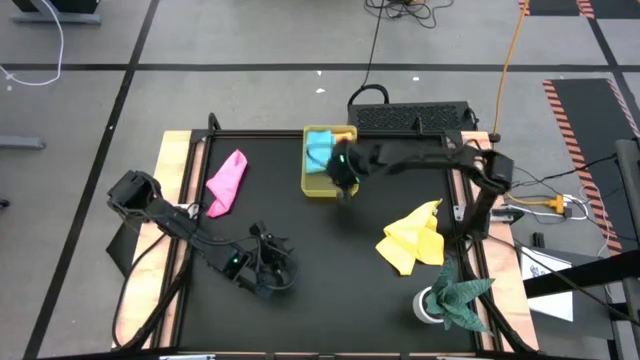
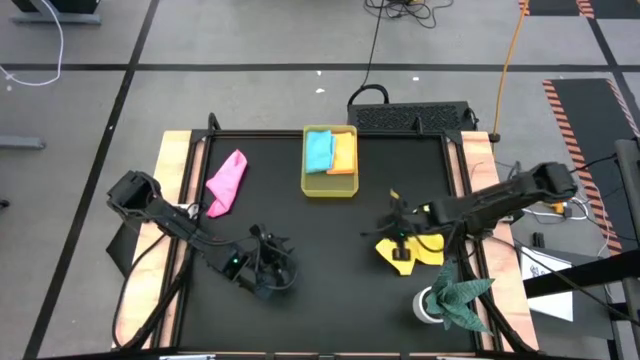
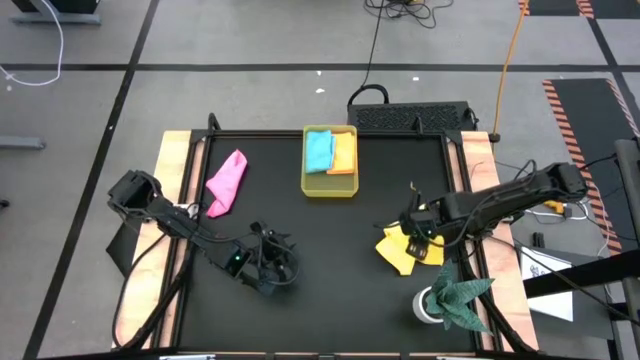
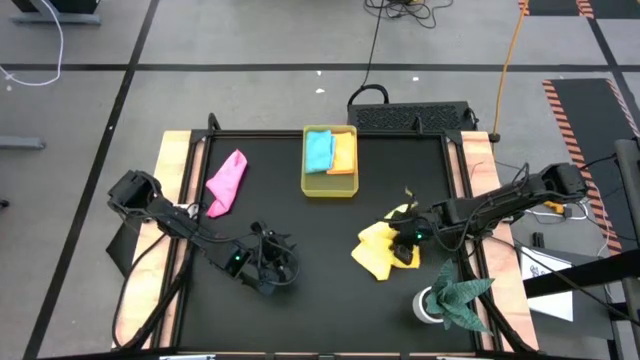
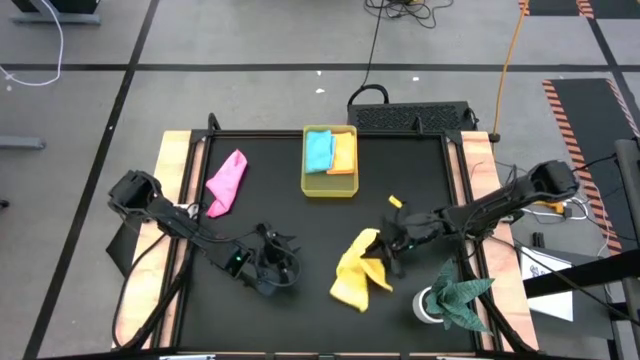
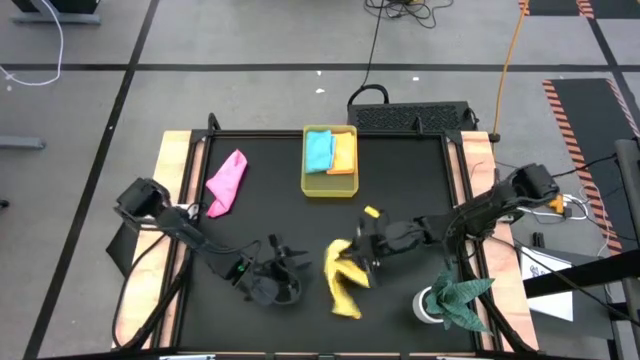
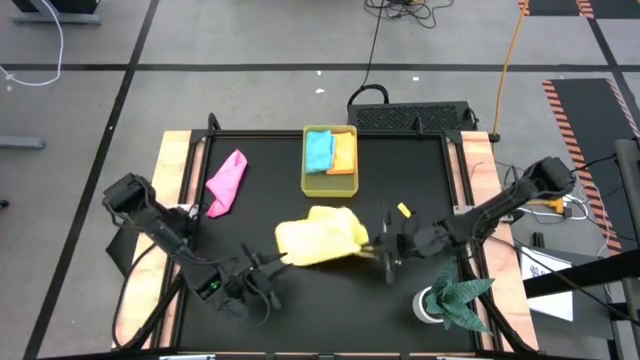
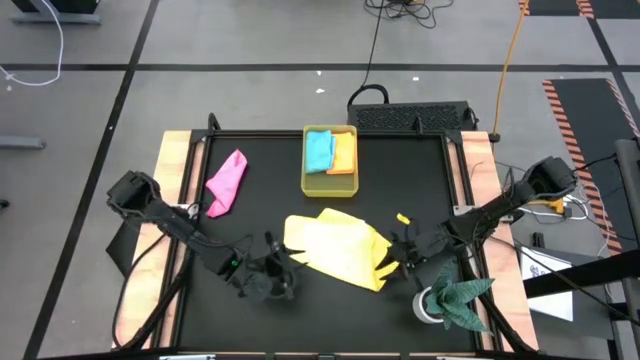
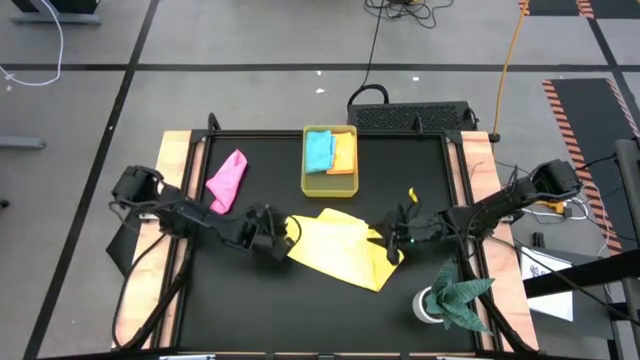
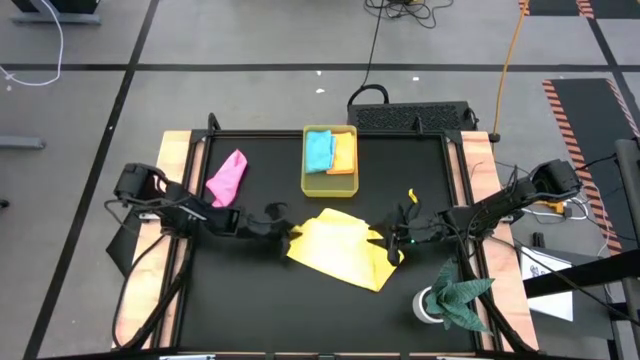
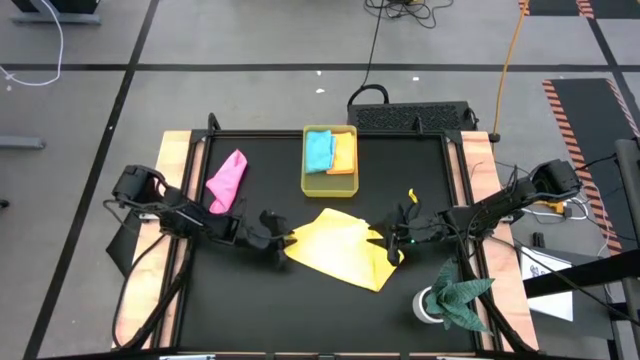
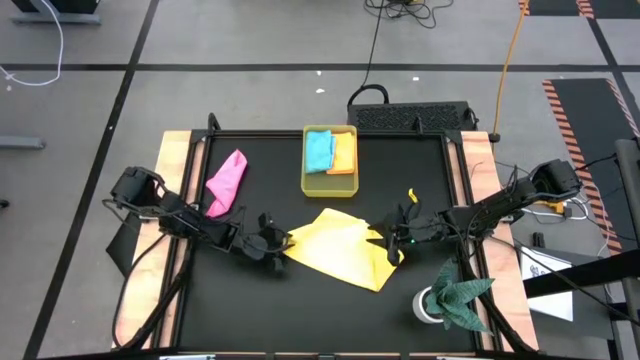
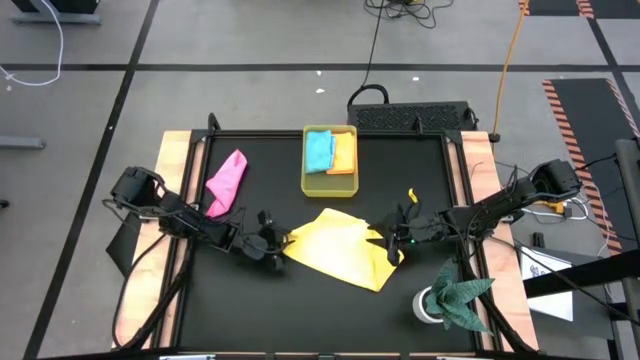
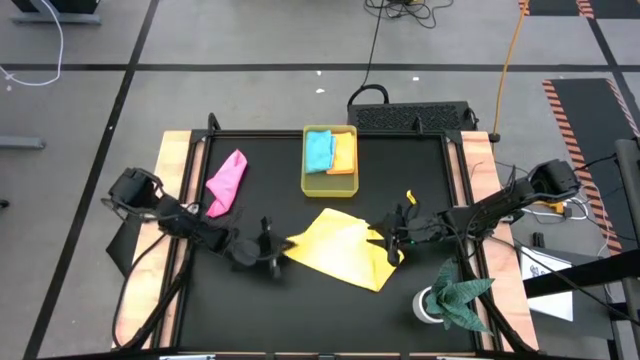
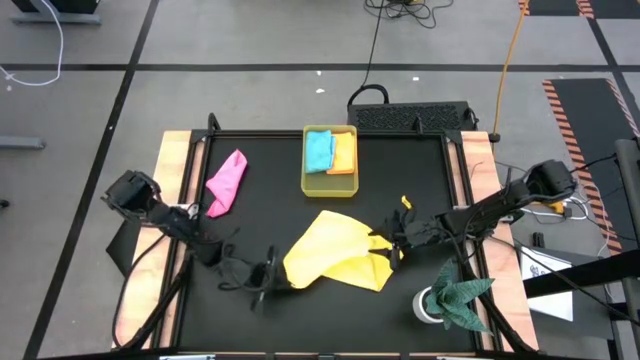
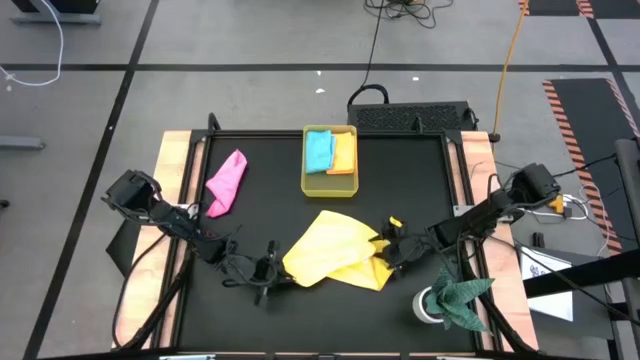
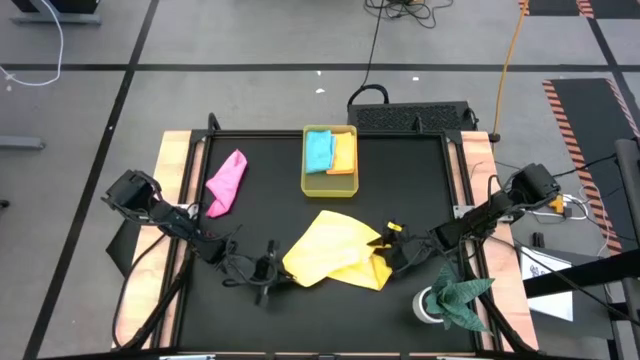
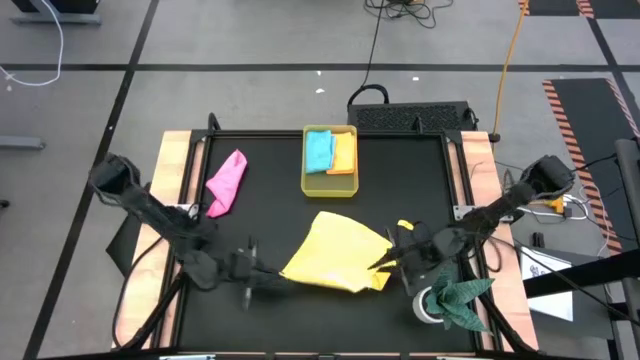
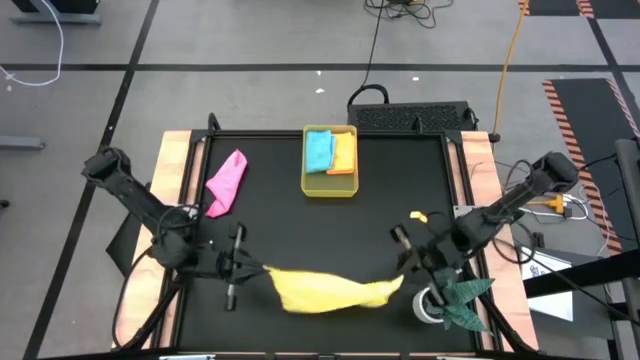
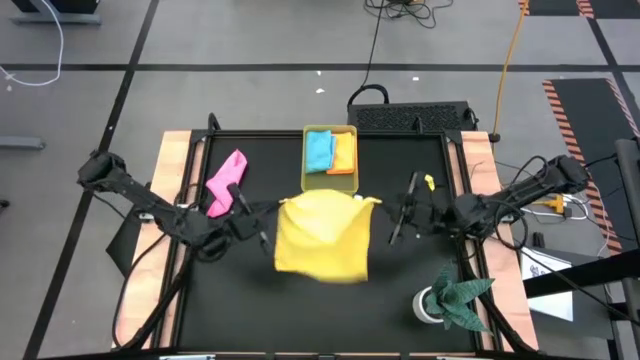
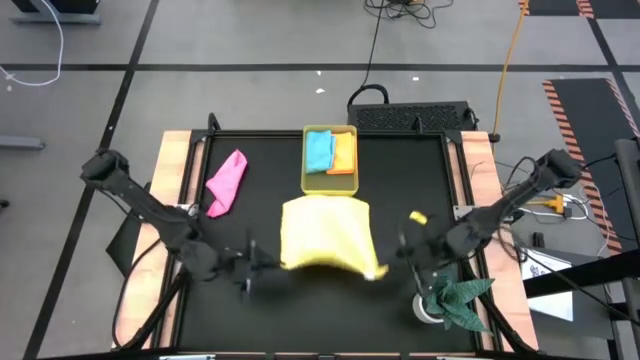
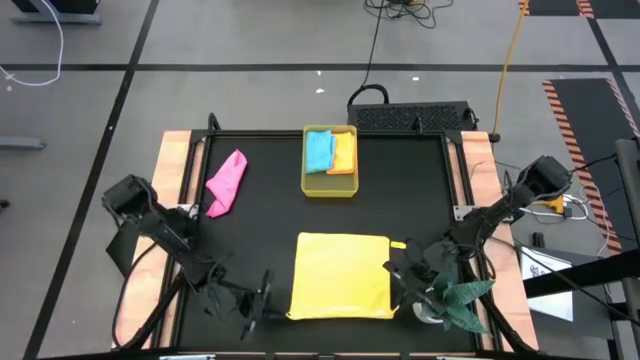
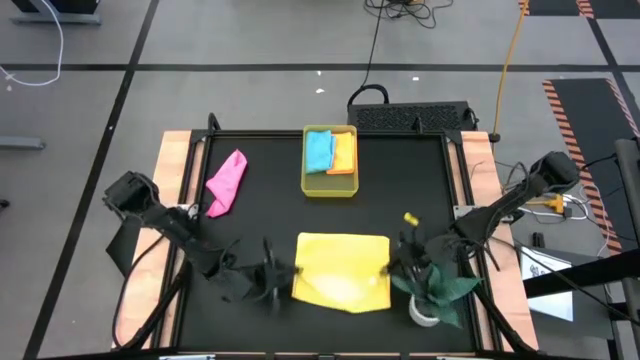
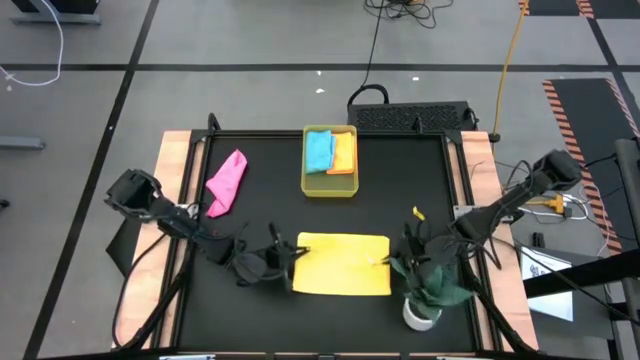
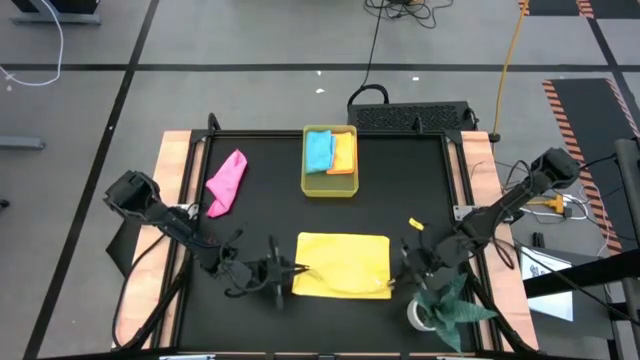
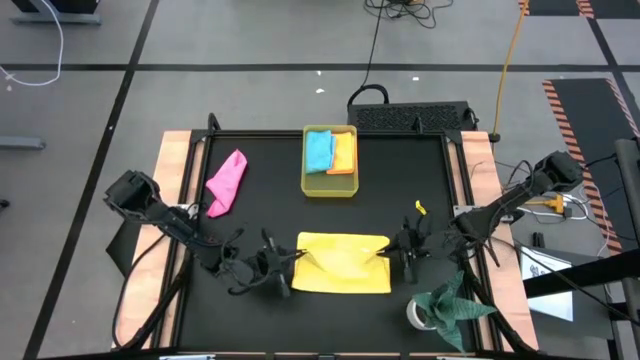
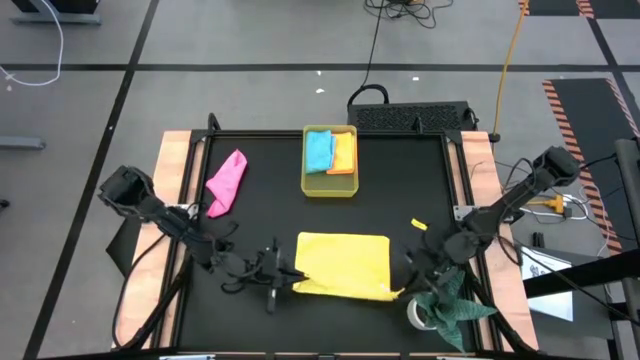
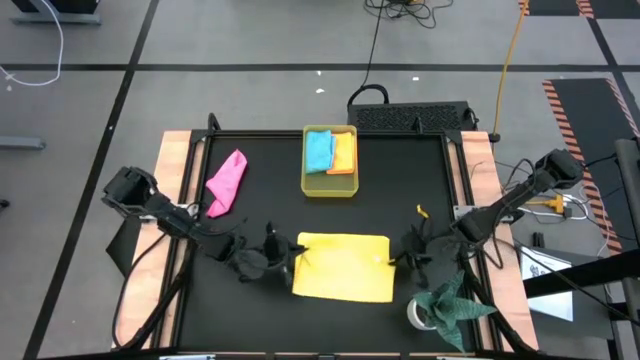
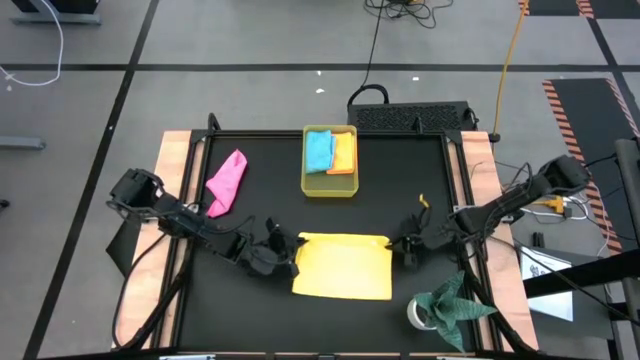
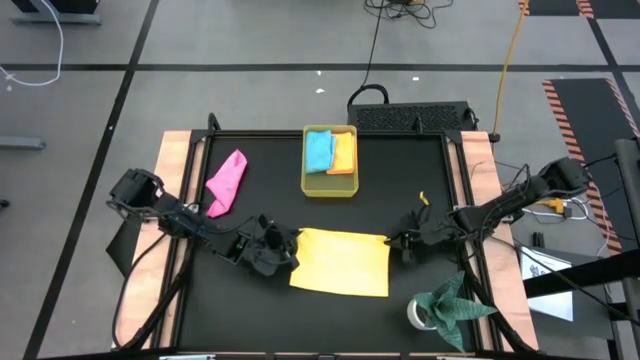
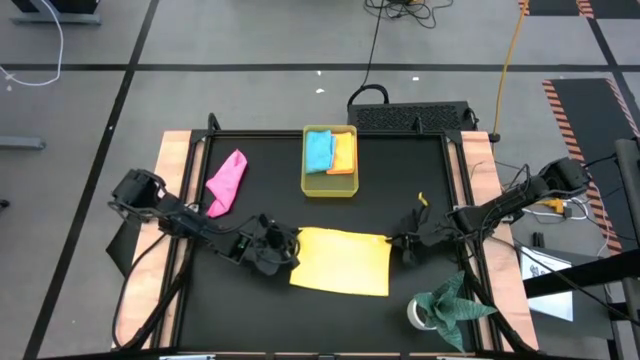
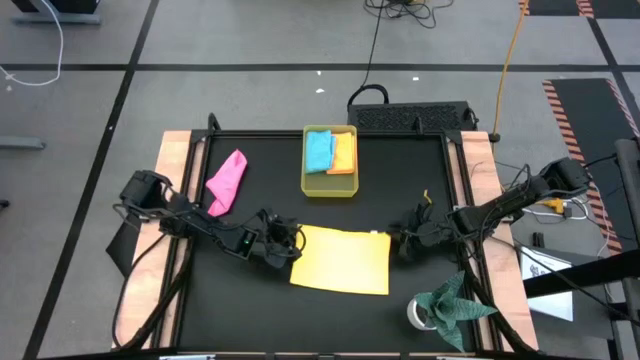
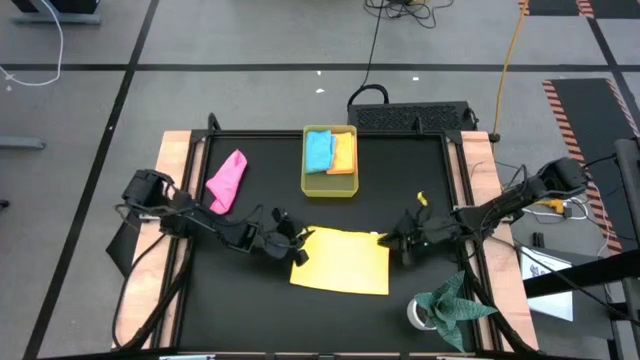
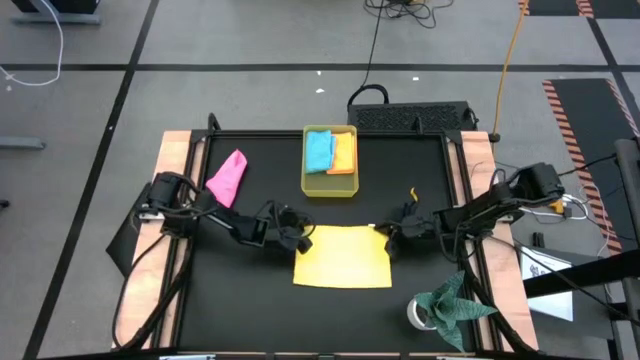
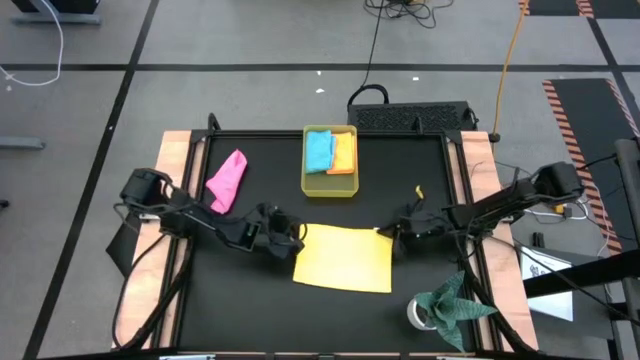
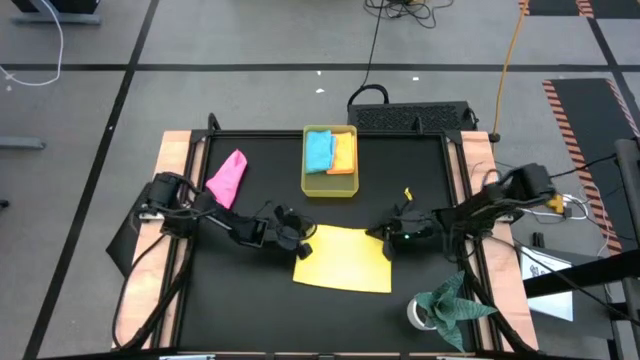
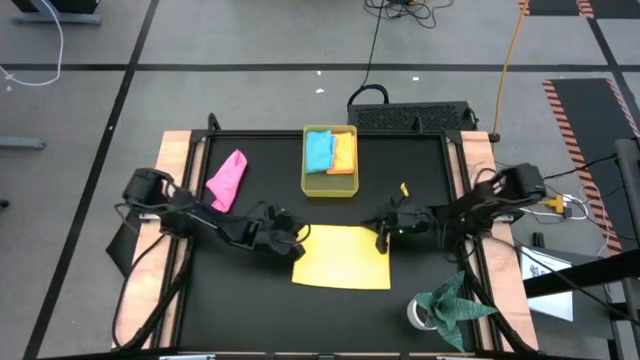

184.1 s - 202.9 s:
Task: Fold microfiber towels
Fold the yellow towel
